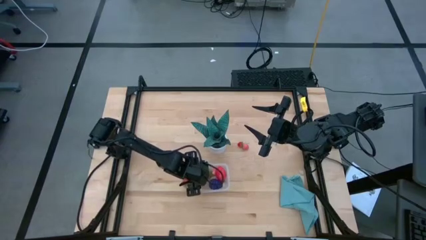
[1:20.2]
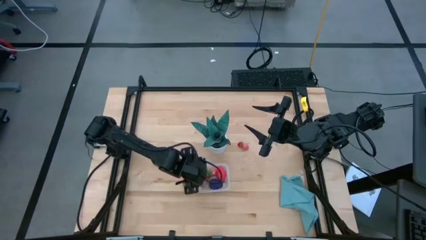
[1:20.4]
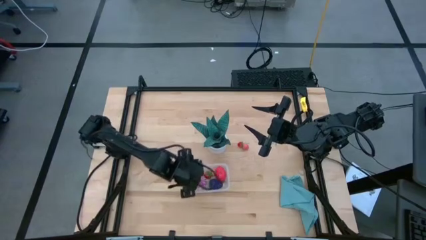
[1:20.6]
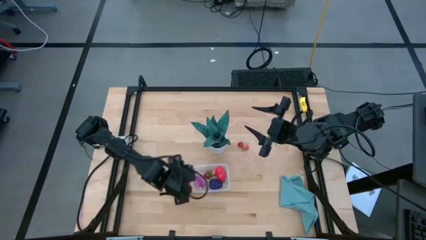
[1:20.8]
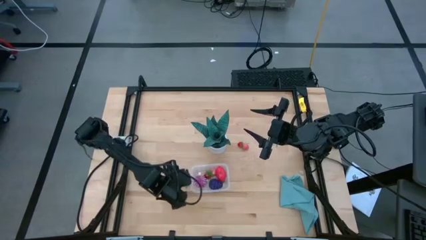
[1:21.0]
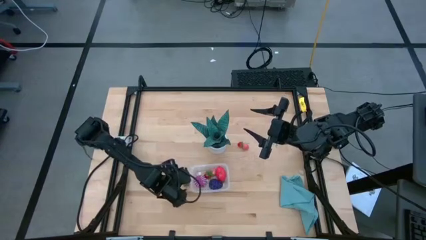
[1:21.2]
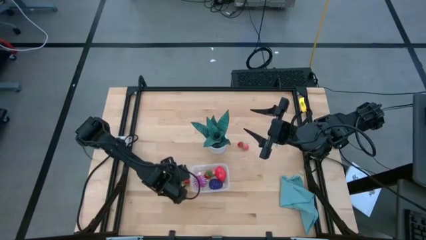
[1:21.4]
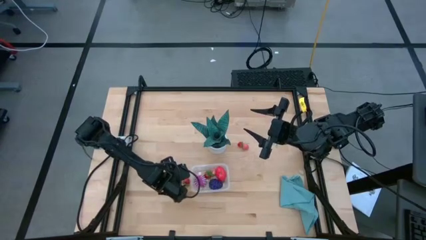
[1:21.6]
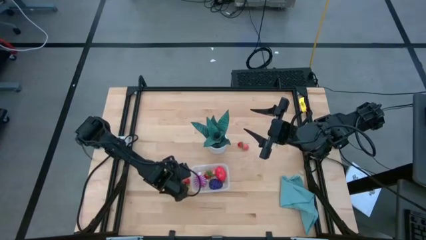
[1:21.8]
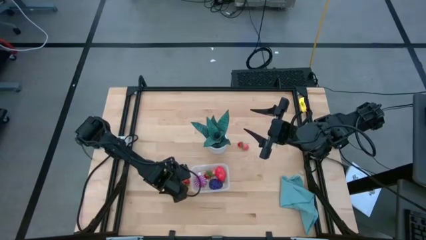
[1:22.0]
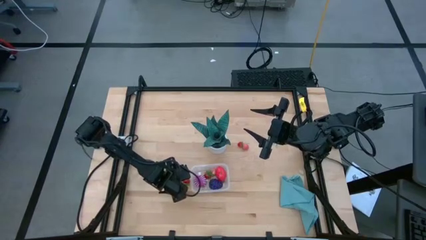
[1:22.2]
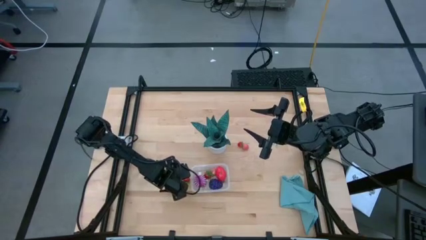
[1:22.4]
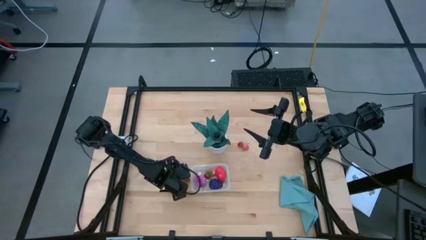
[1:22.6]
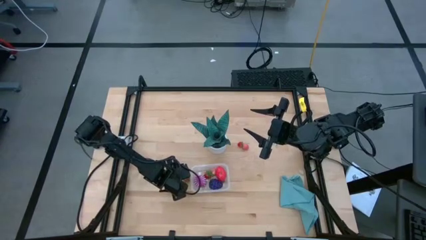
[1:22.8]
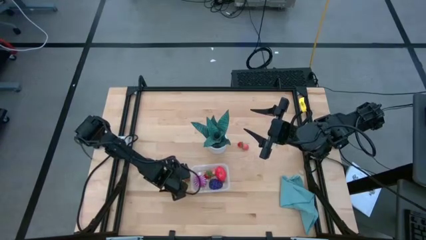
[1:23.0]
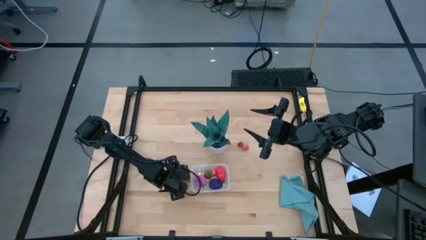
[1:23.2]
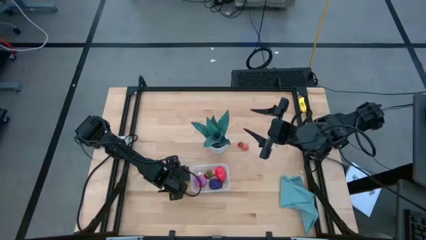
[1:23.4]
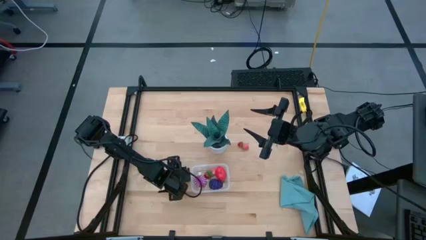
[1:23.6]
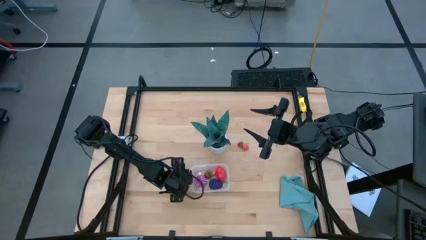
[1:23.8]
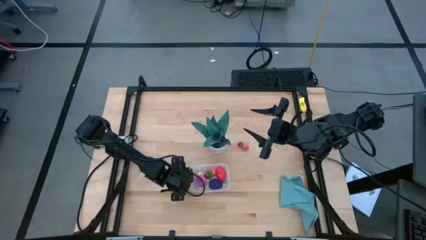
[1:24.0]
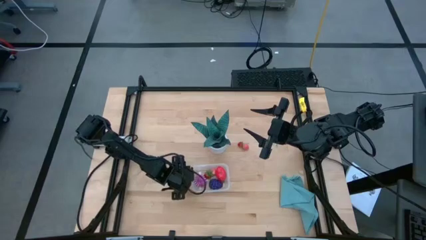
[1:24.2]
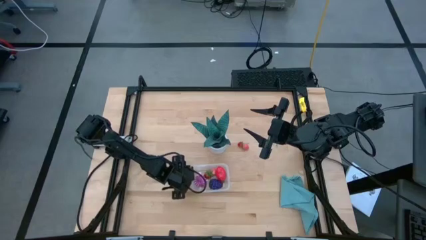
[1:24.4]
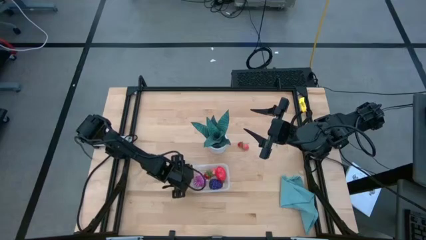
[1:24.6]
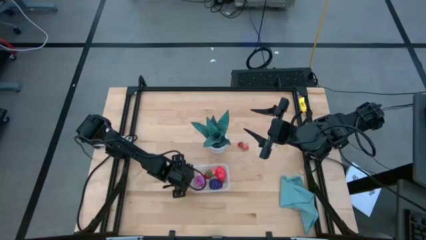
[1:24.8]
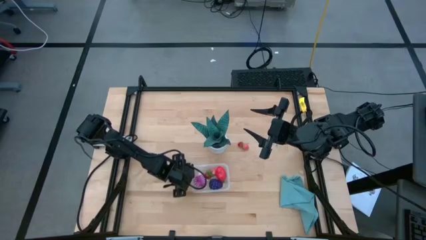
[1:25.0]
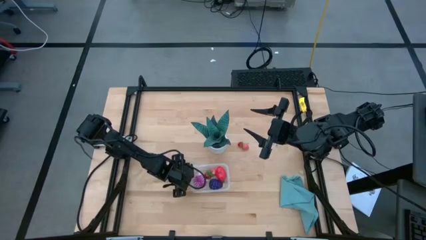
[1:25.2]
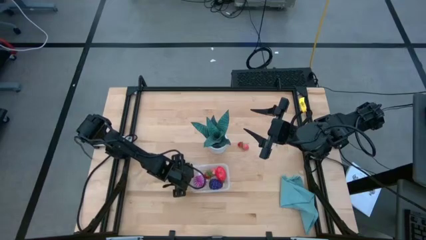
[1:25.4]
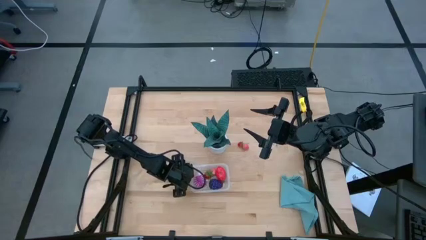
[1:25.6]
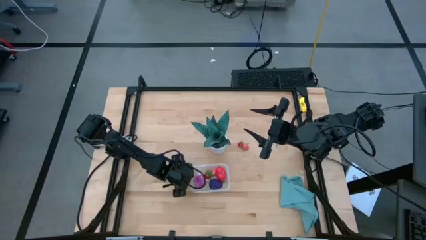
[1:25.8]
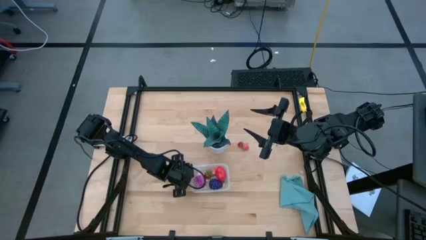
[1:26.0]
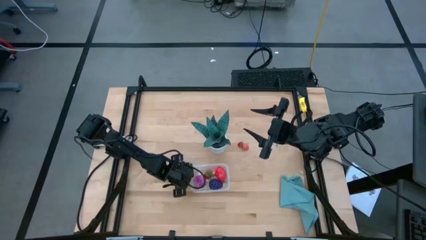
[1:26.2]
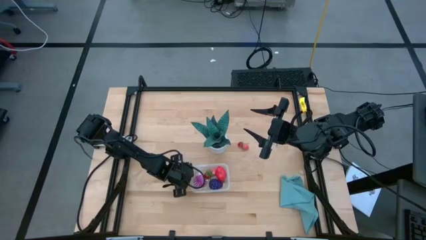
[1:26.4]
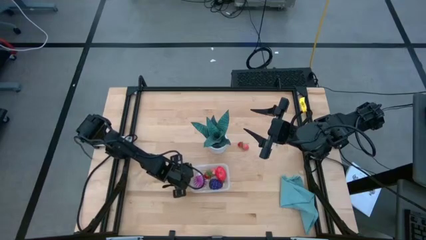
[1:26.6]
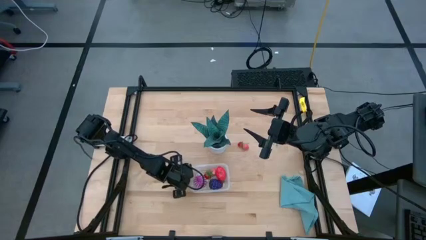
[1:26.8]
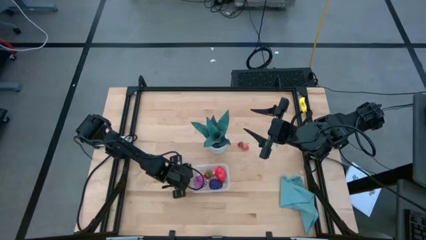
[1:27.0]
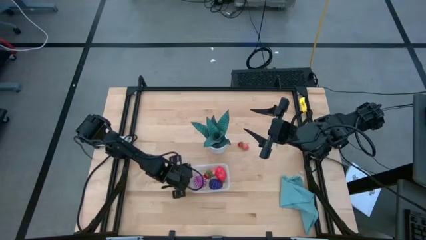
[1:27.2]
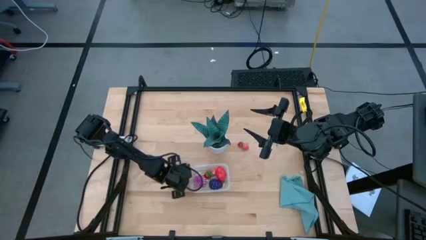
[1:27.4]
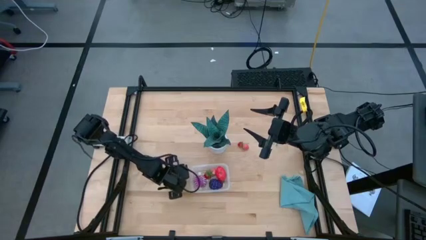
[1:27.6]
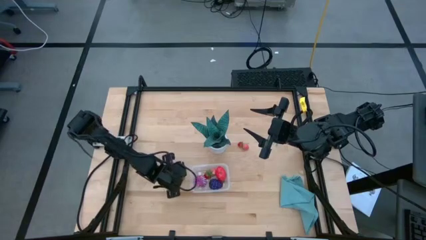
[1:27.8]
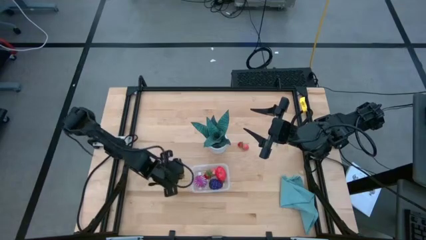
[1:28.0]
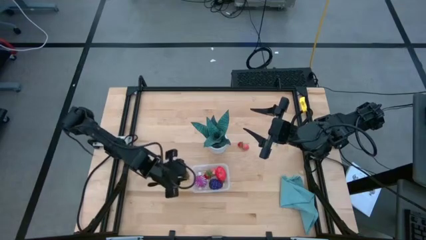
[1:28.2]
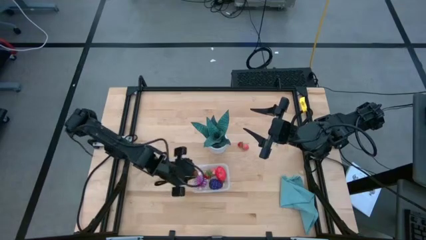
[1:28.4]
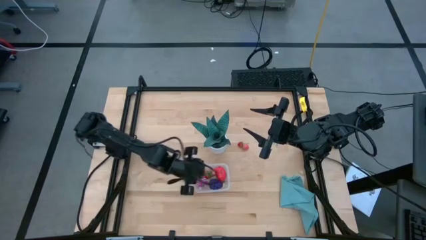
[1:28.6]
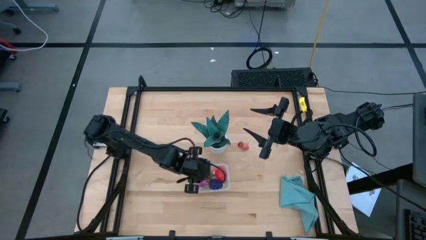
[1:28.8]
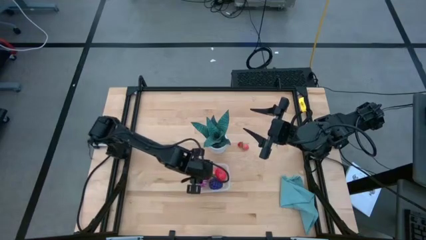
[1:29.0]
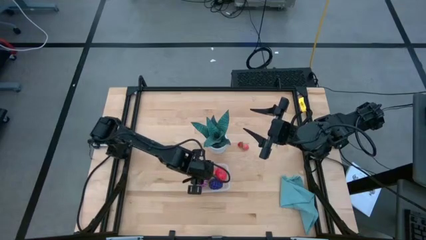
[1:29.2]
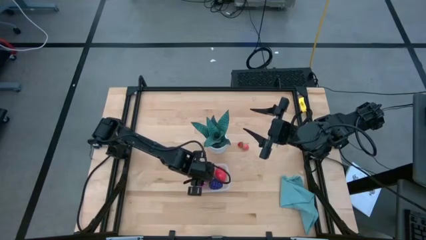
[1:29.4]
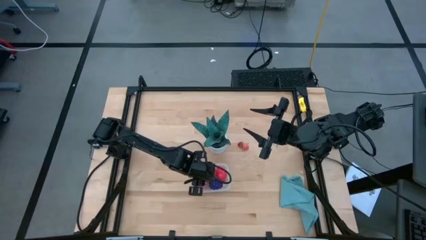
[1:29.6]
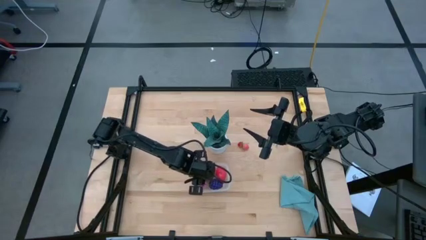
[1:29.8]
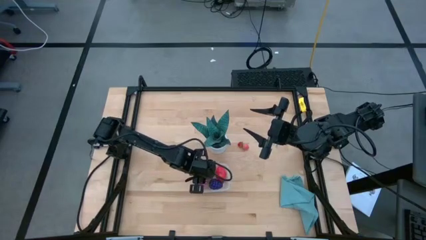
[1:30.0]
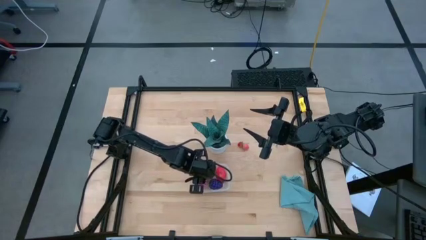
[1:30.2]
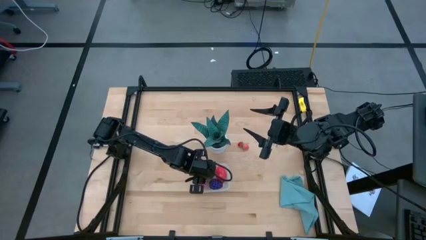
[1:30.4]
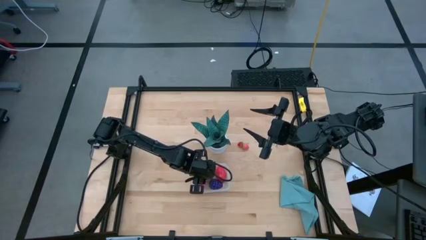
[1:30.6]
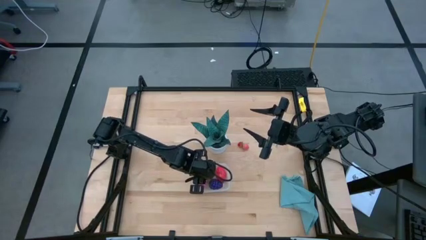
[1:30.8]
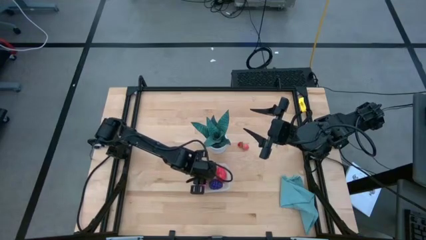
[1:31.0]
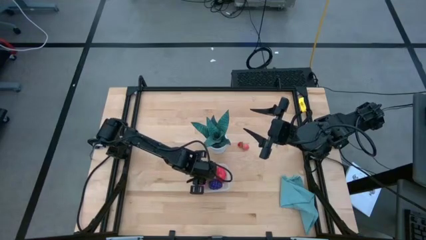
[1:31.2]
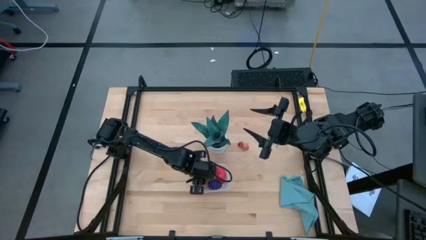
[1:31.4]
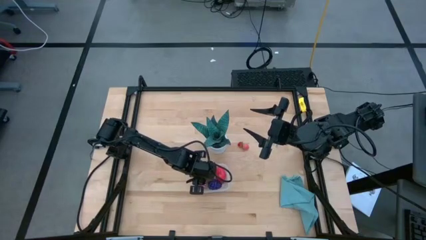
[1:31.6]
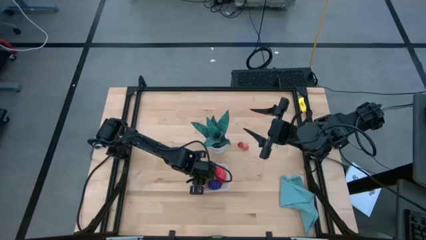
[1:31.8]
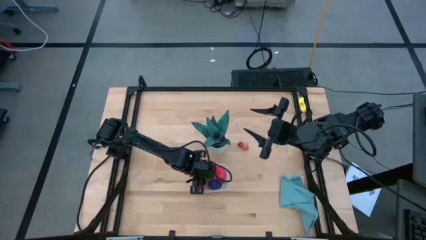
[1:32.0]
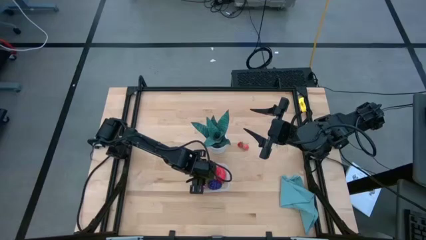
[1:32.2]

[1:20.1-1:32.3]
Task: Pick and placing Produce into tupperware
Put the bottom red strawberry into the transparent bin

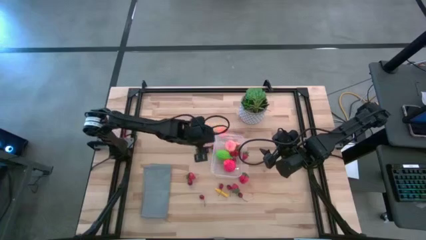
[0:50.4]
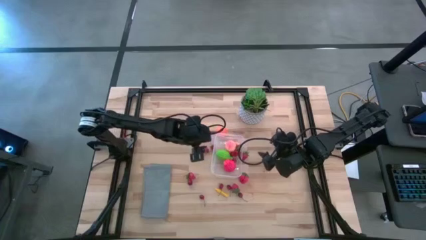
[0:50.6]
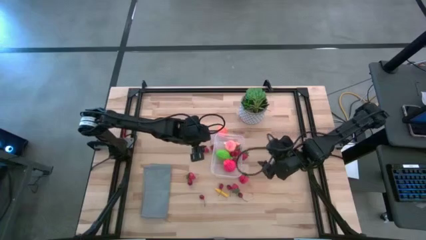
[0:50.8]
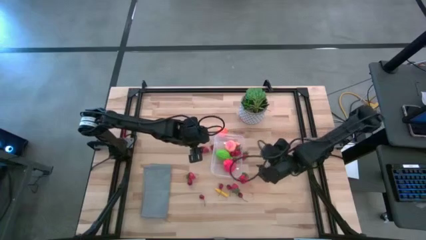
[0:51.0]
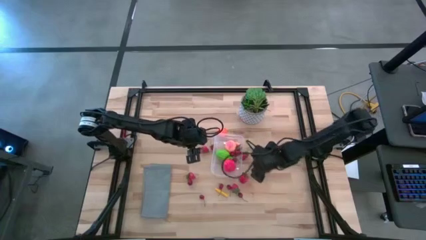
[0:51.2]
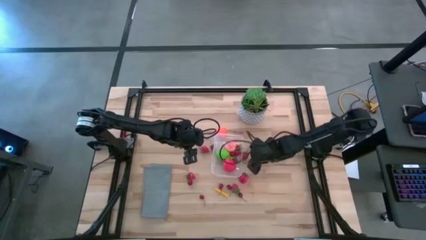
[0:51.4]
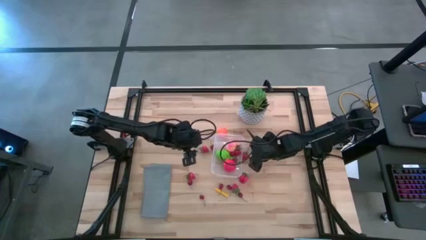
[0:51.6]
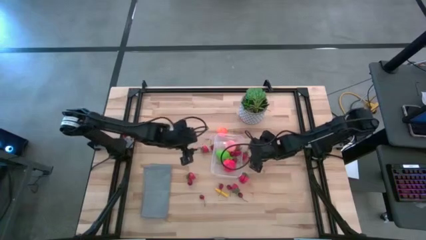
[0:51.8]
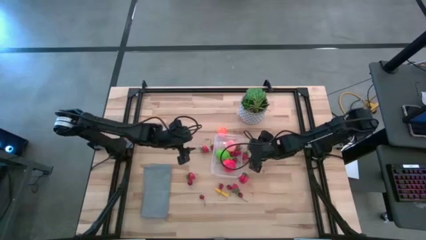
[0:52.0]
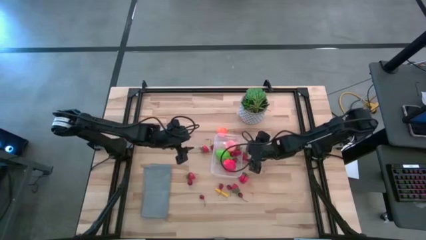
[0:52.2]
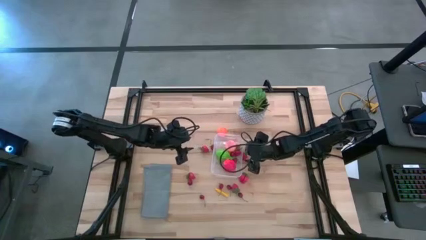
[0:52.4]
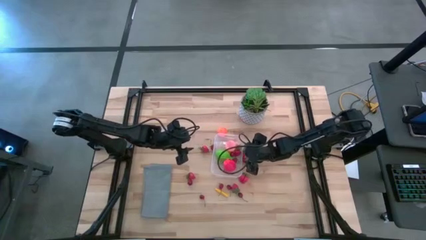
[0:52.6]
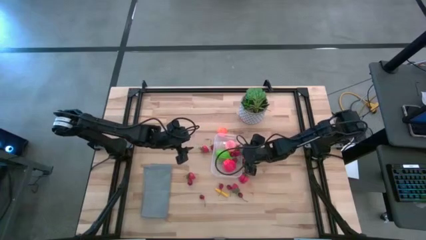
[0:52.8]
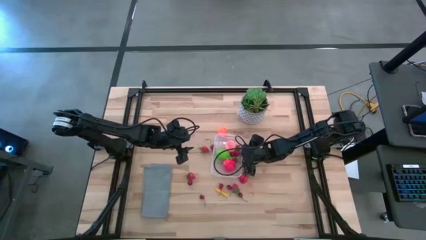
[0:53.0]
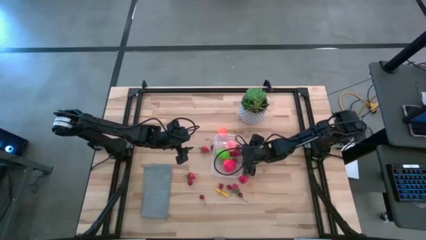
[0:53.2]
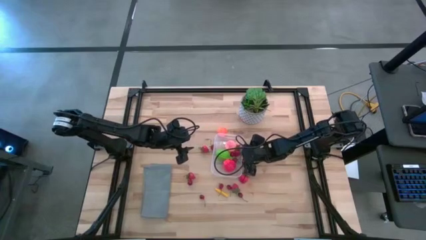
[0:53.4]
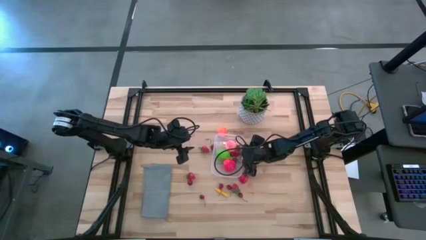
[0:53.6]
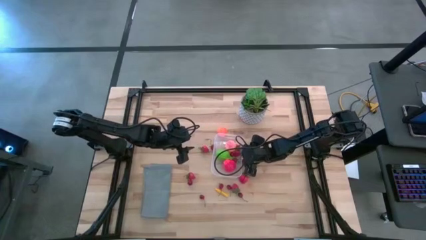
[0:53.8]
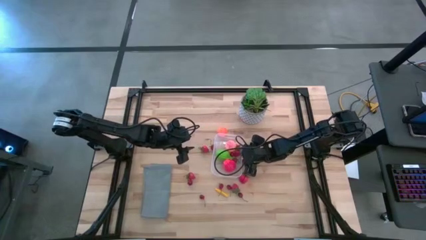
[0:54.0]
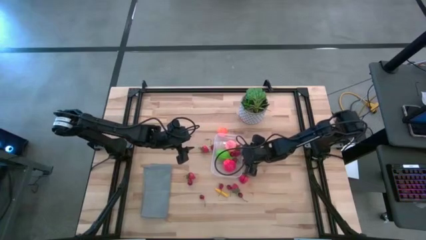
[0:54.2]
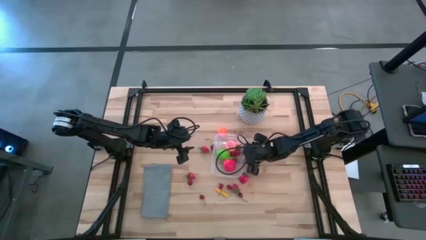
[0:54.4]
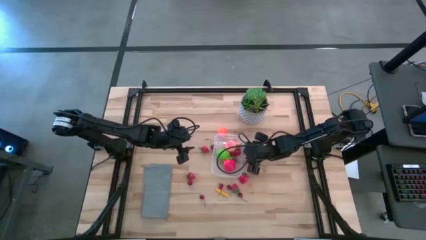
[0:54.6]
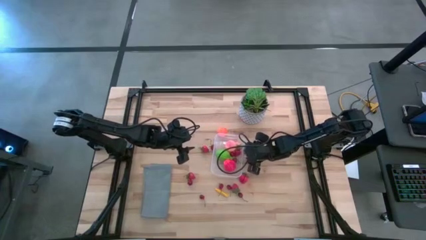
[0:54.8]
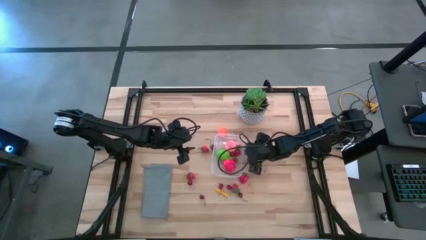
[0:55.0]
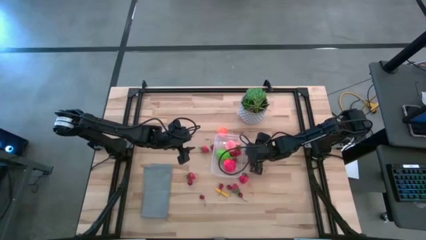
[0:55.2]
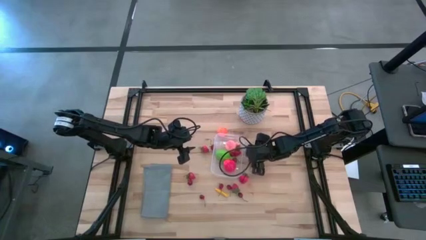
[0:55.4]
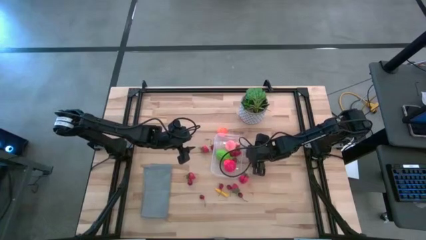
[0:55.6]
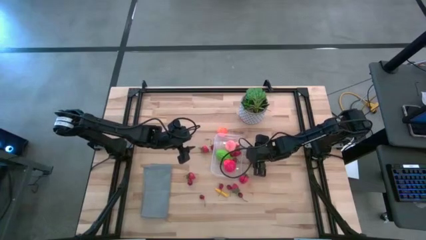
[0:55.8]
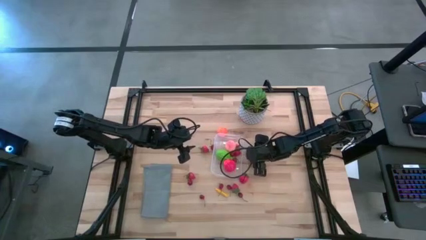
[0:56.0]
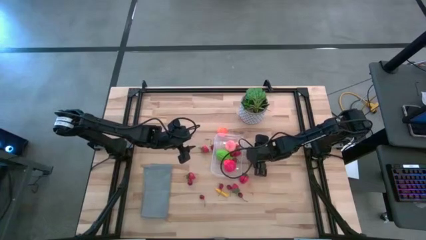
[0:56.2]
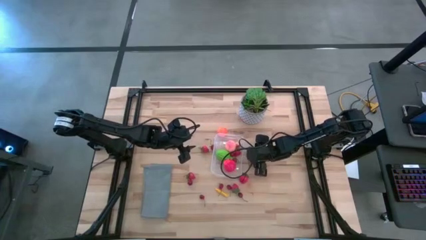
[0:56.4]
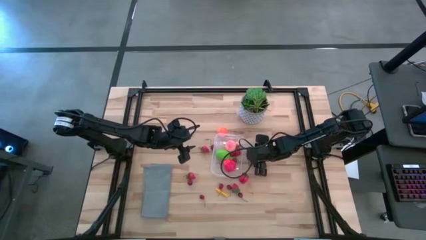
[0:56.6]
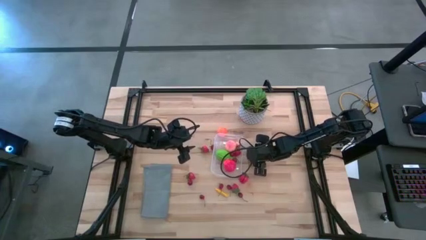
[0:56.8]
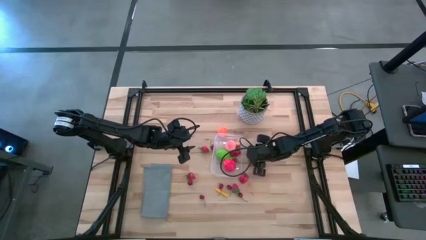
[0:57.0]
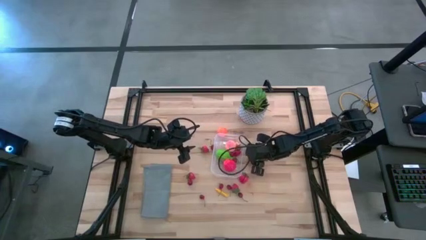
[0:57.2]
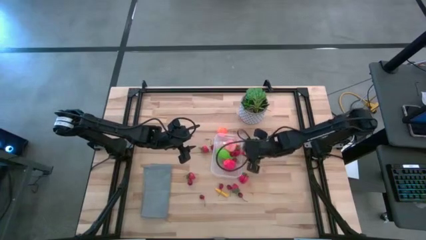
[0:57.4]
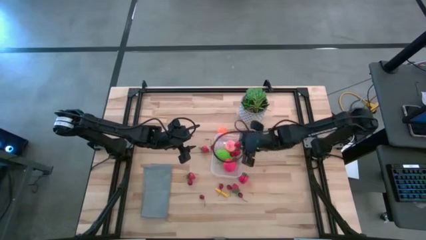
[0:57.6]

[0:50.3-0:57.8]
Task: Pick and placing Produce into tupperware
Put the red strawberry into the transparent bin
